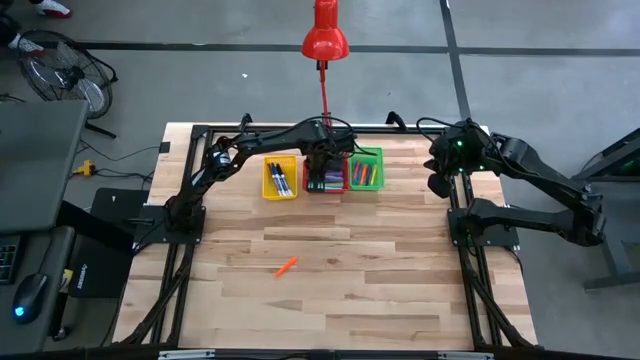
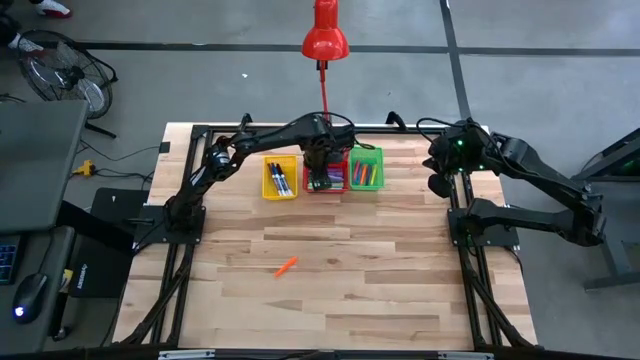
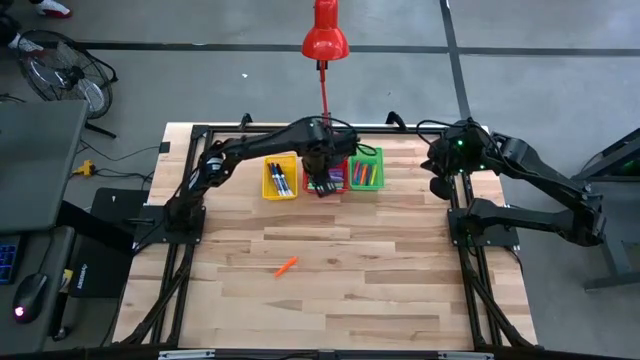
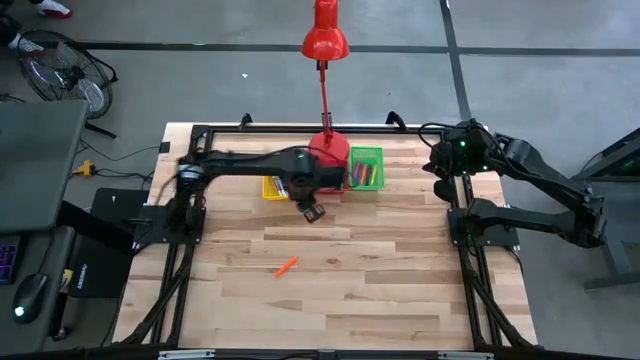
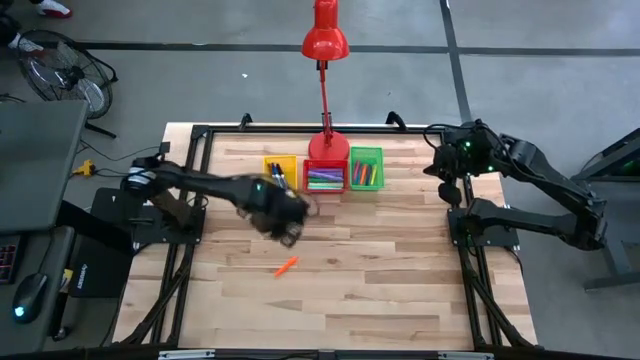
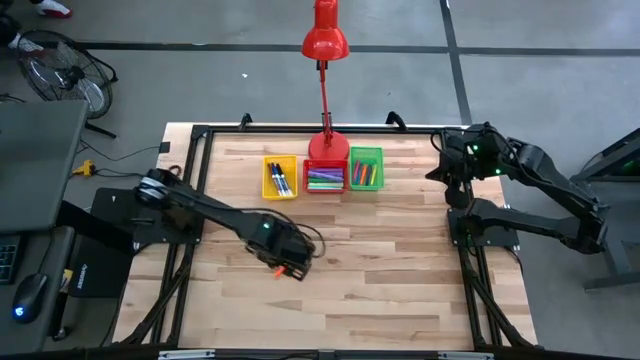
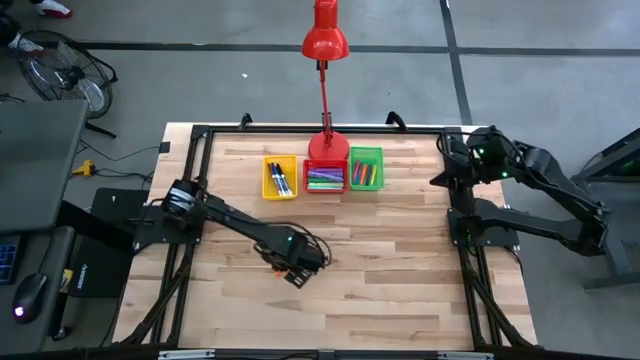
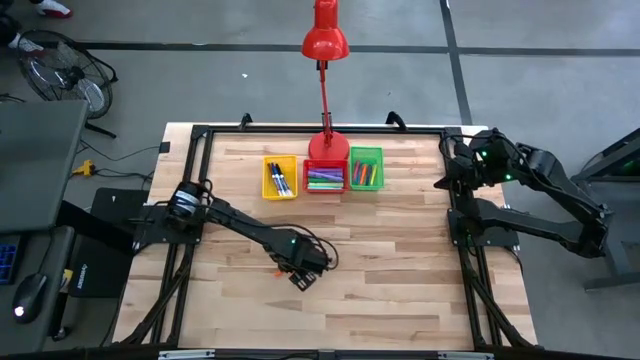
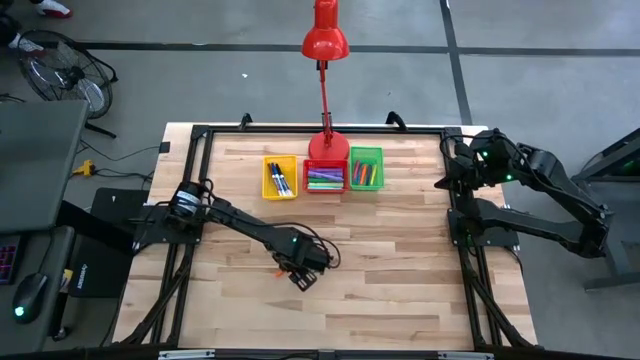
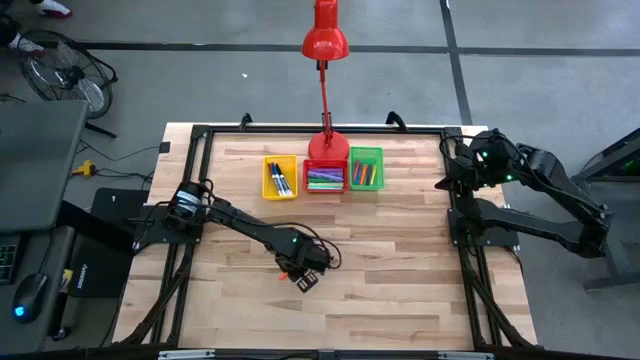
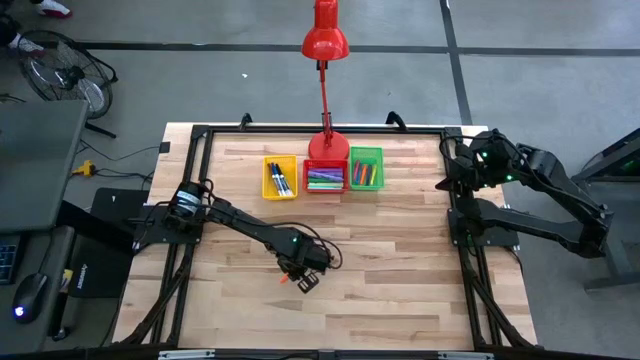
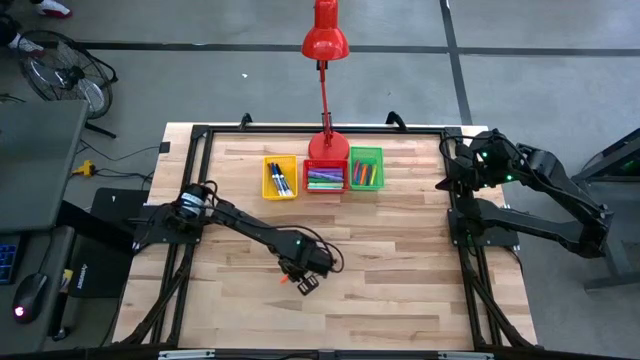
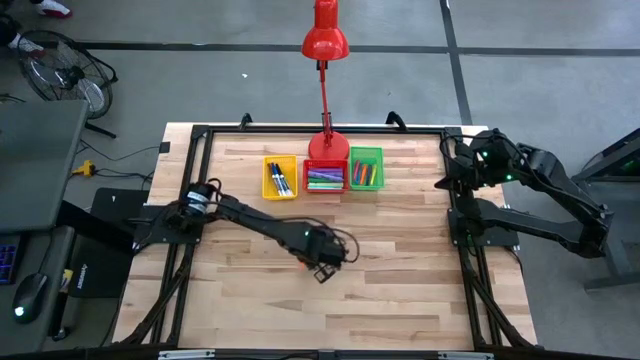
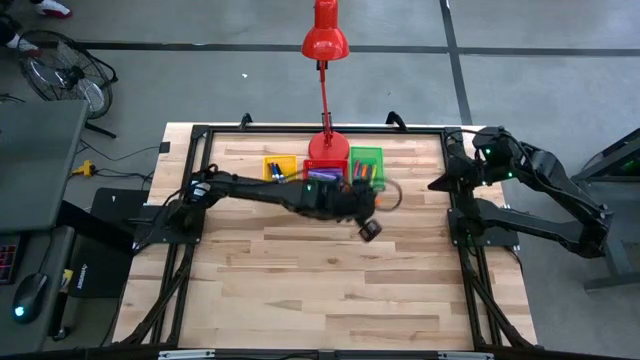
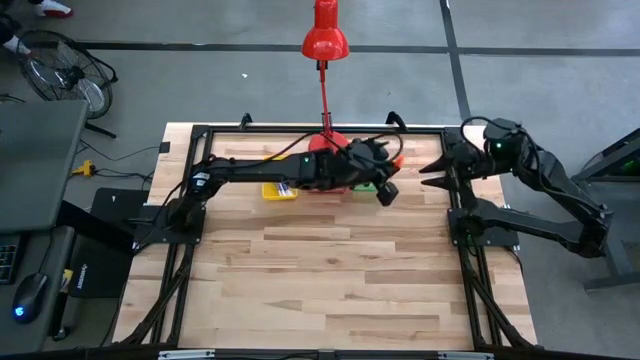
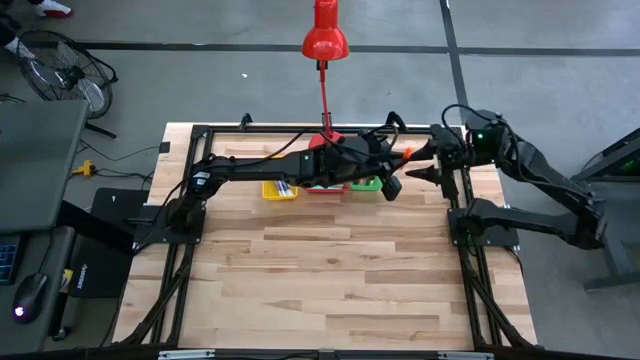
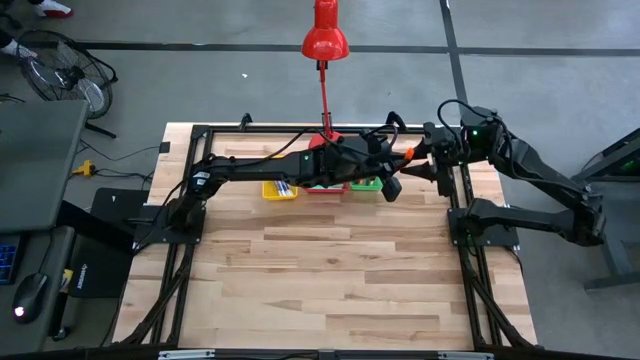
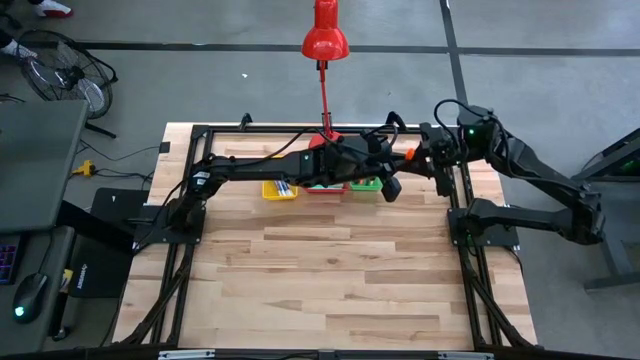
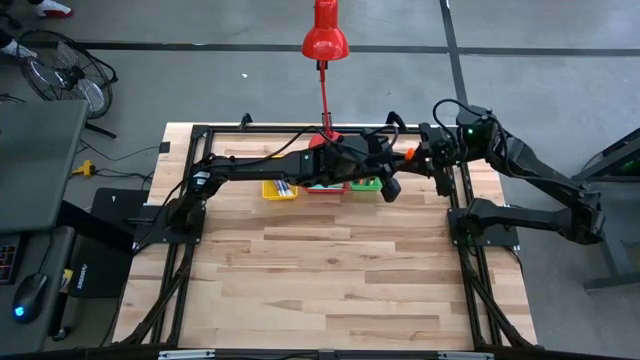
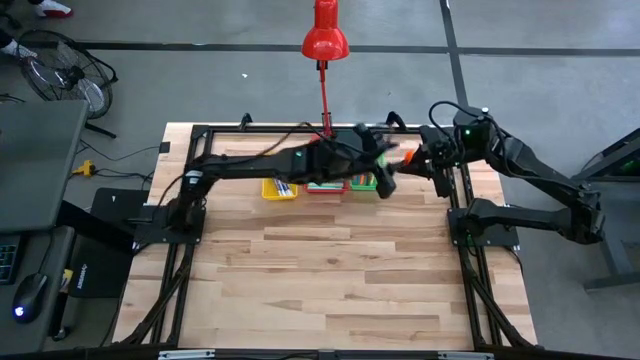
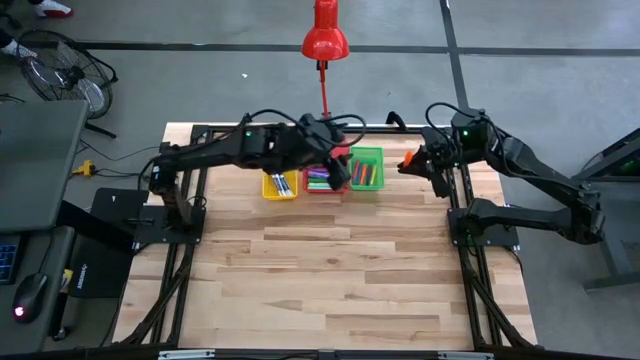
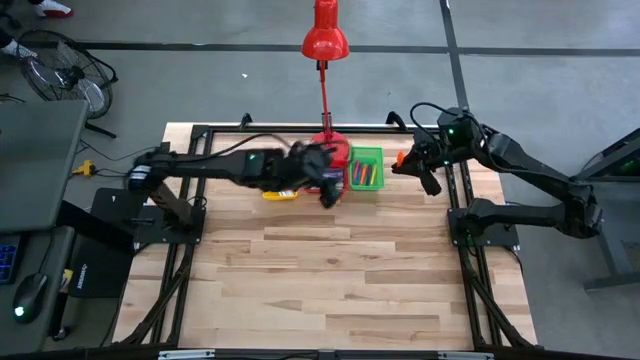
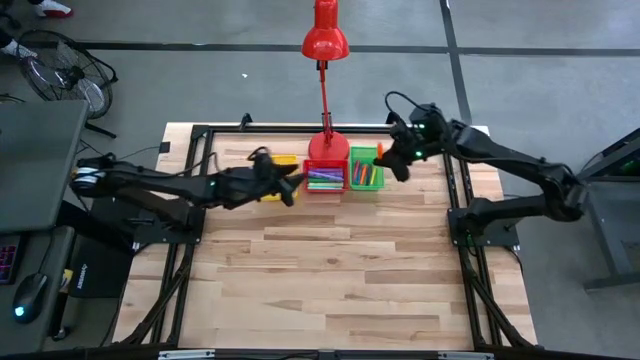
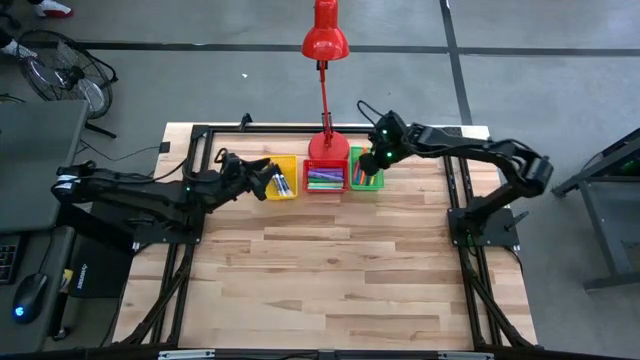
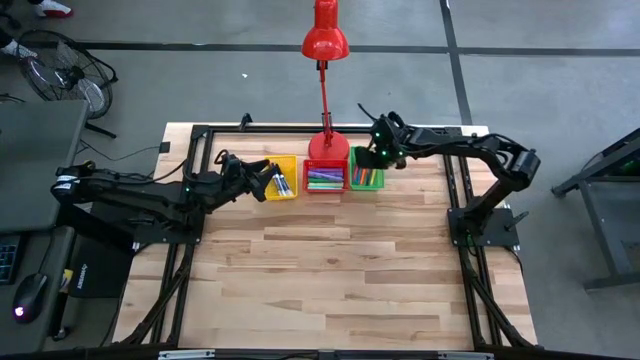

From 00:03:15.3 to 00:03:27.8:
Task: Pick & Place Markers
Put the orange pen into the green bin

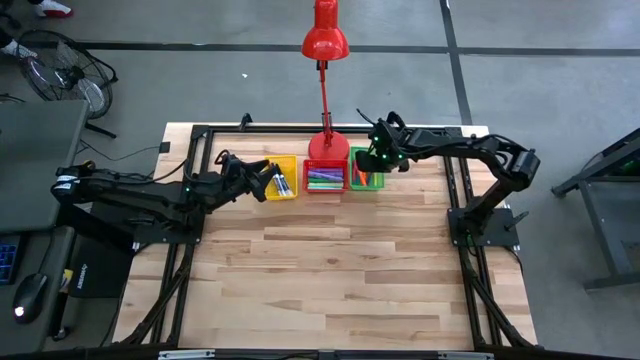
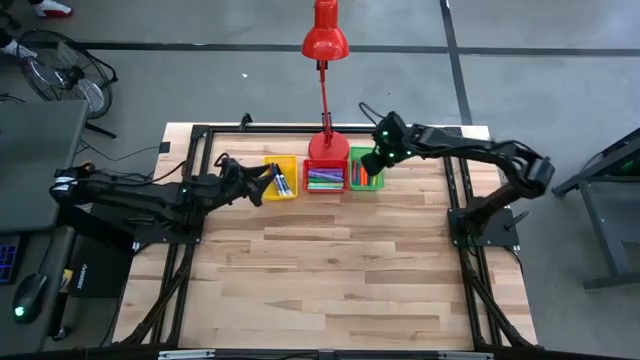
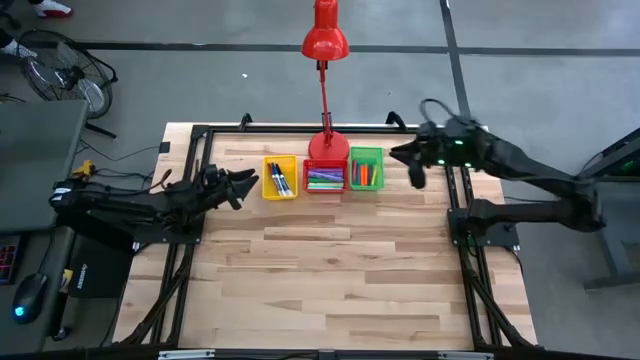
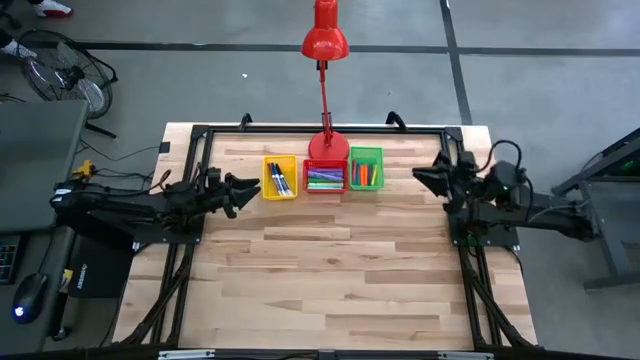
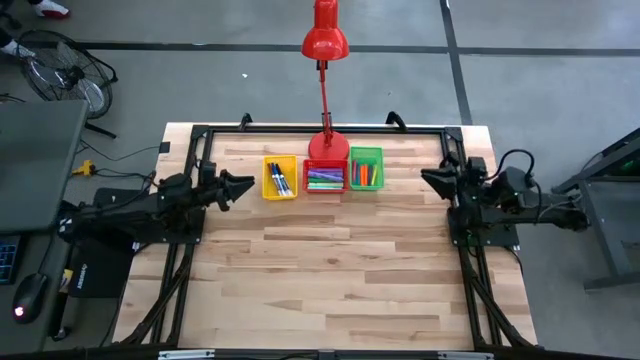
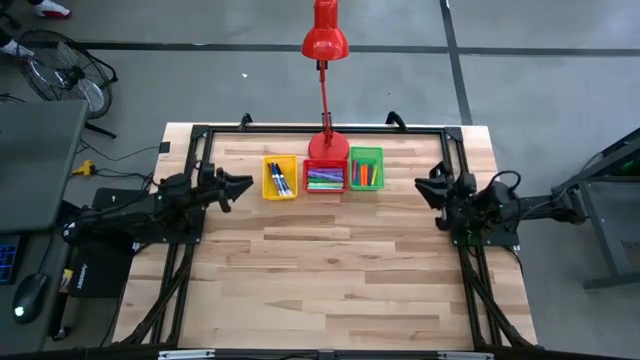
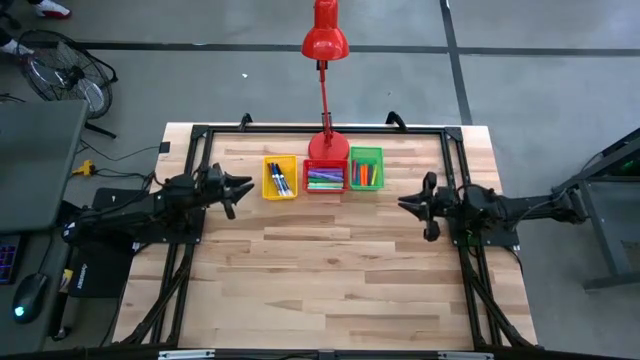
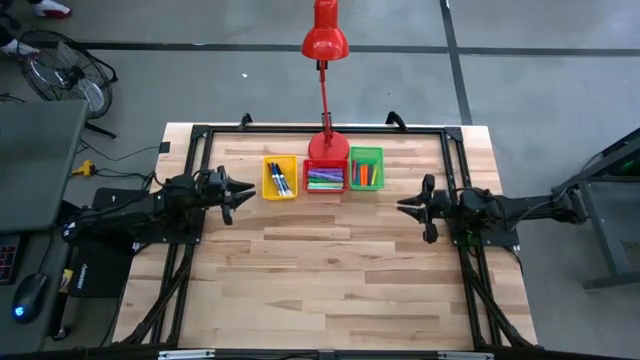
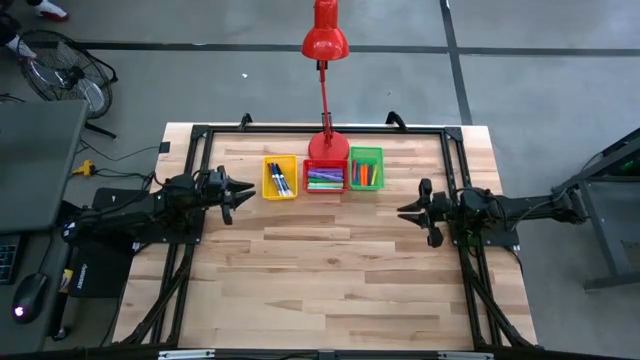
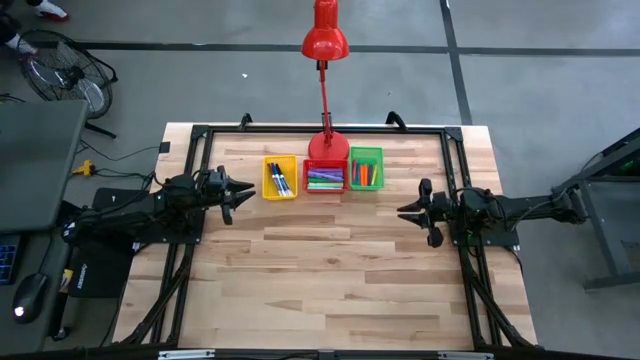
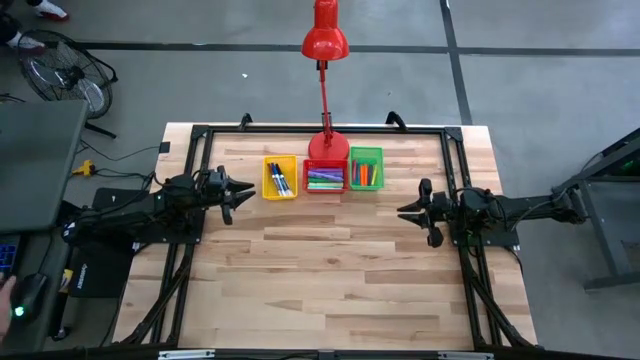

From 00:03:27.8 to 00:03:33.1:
Return to Home Position

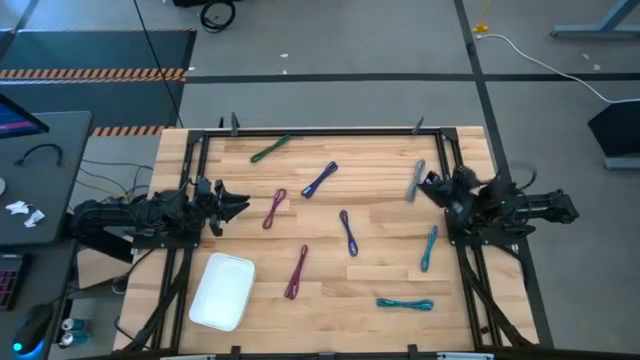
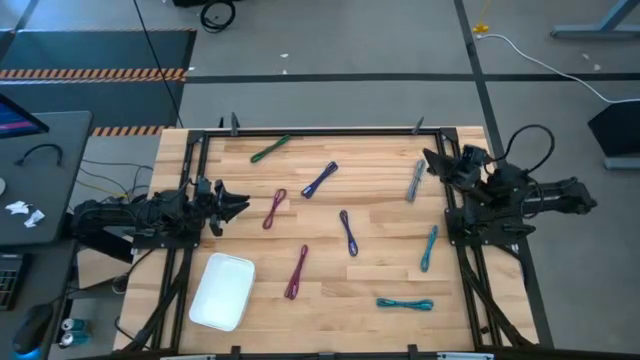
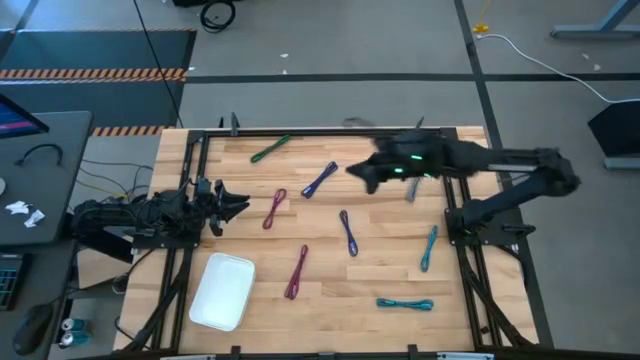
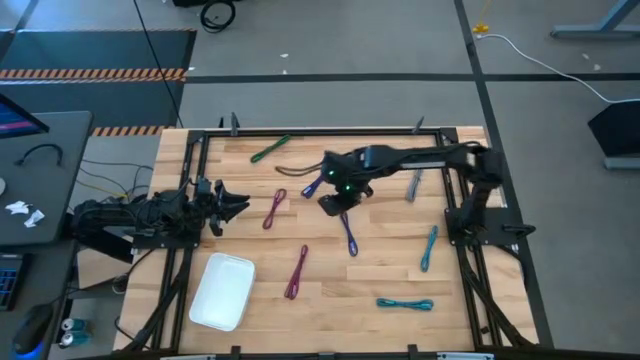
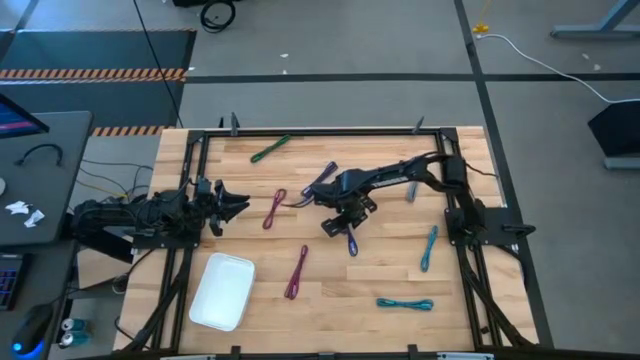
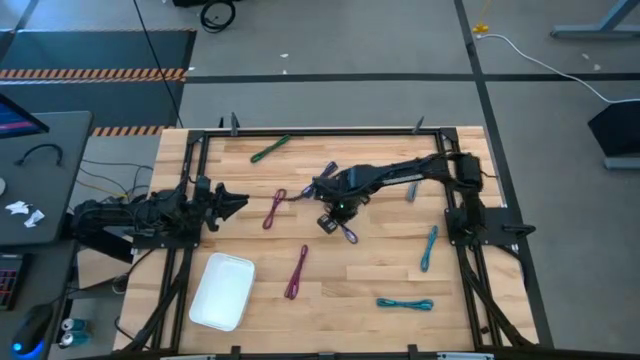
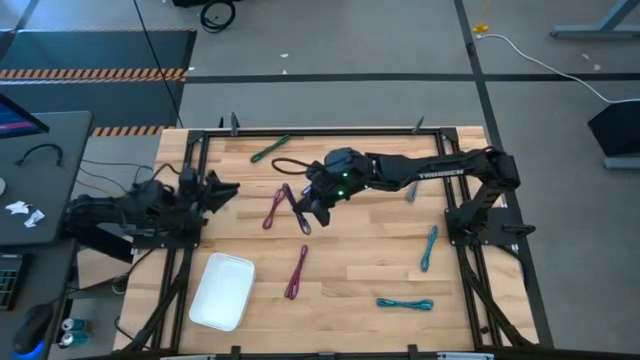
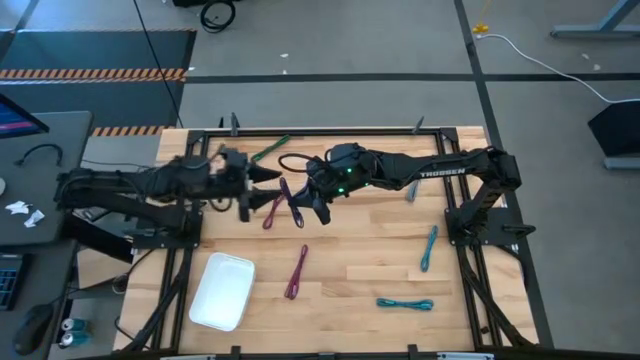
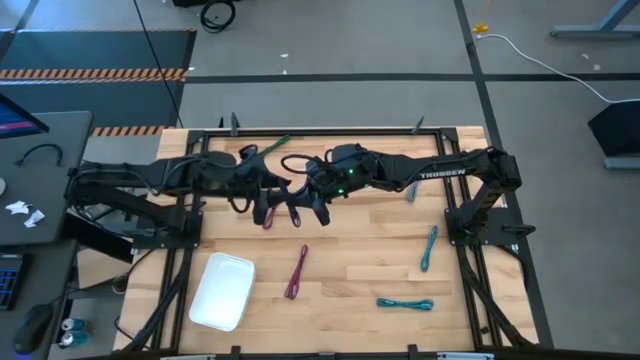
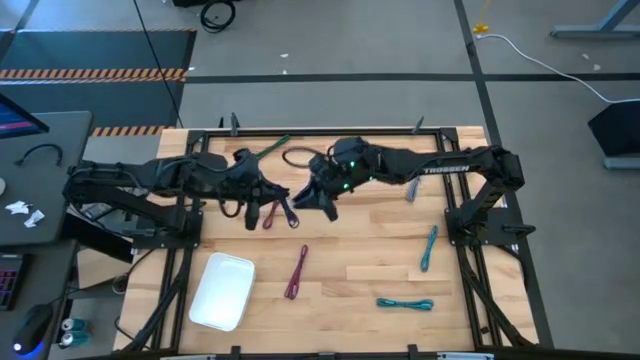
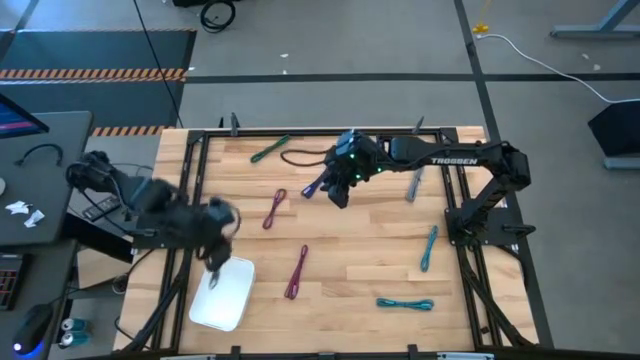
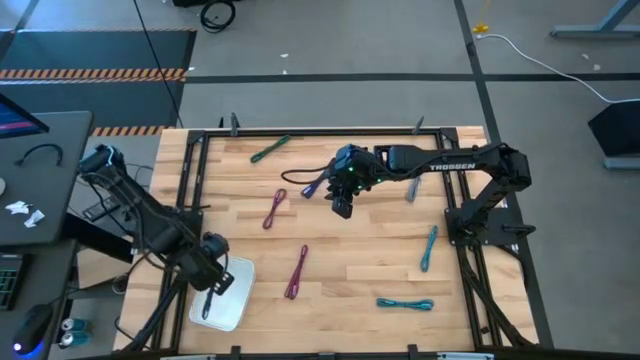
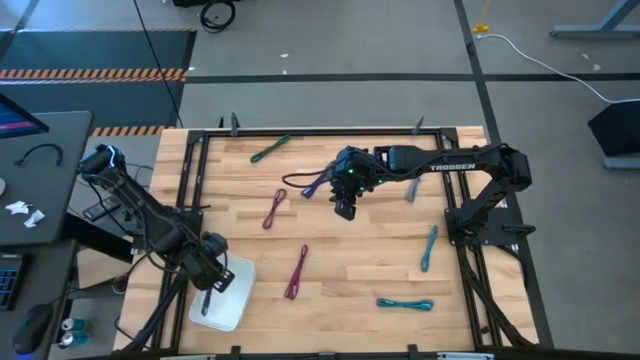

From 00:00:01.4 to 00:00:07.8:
Task: Pick and place USB-C Cables
Put the bottom purple charger cable into the white bin
